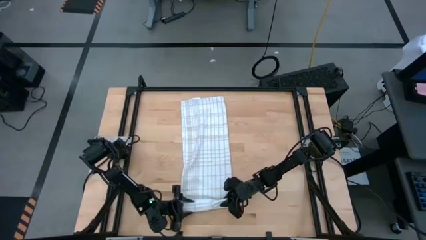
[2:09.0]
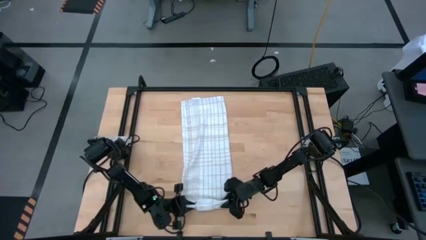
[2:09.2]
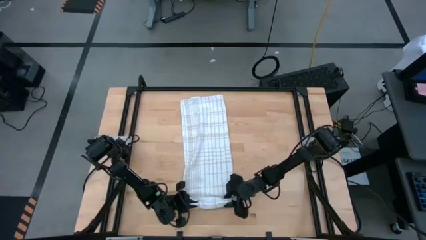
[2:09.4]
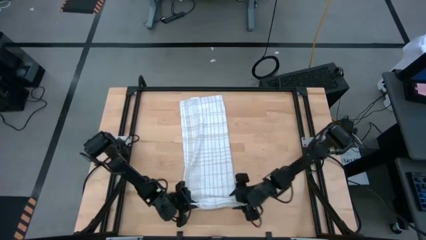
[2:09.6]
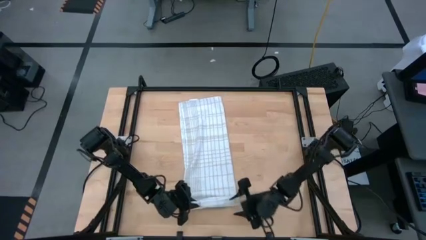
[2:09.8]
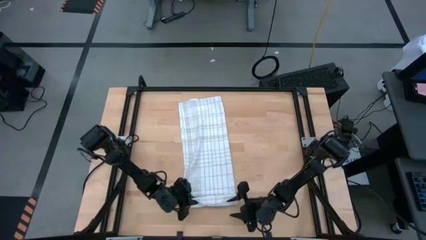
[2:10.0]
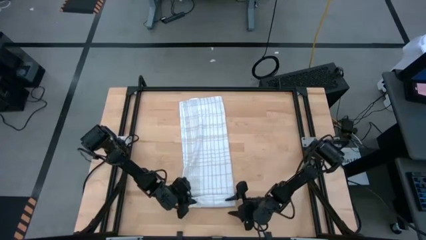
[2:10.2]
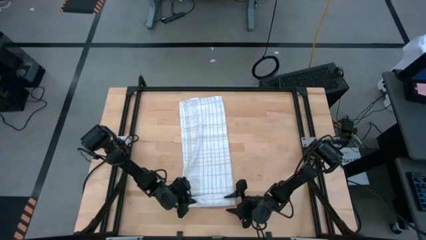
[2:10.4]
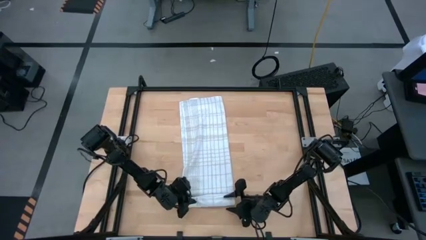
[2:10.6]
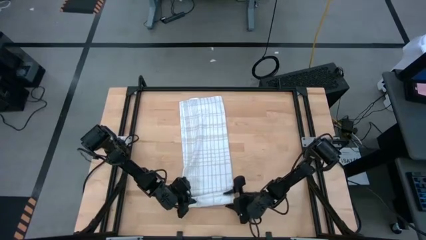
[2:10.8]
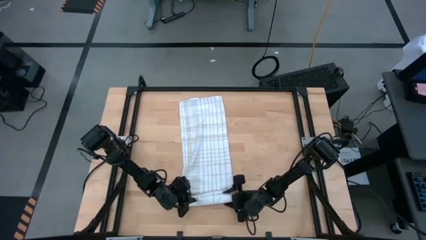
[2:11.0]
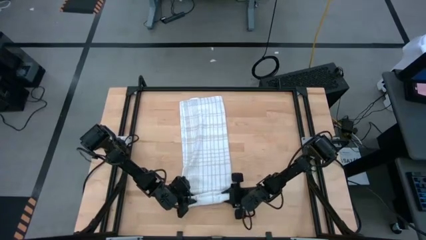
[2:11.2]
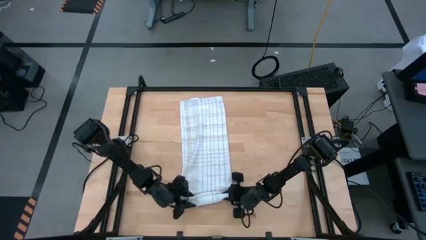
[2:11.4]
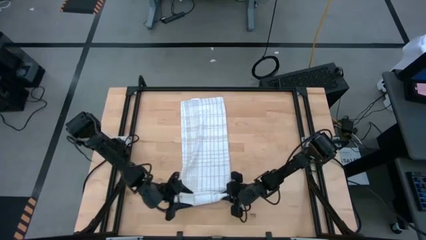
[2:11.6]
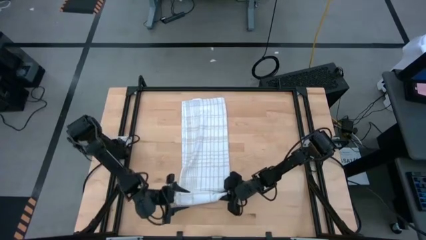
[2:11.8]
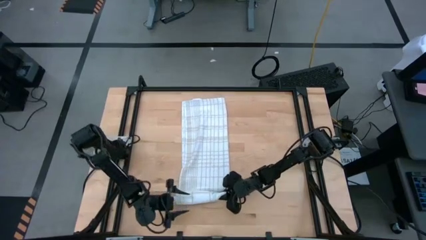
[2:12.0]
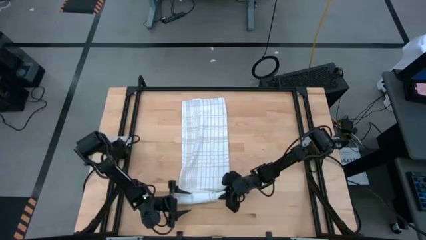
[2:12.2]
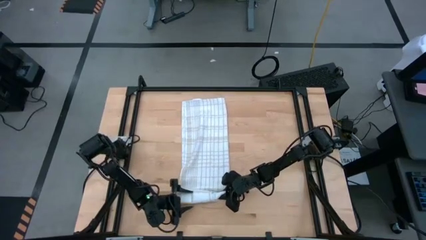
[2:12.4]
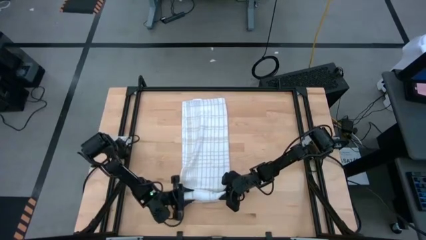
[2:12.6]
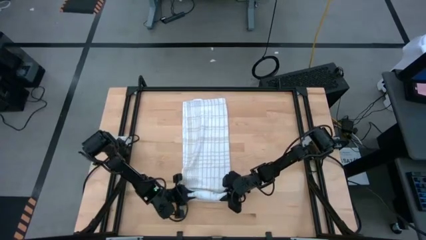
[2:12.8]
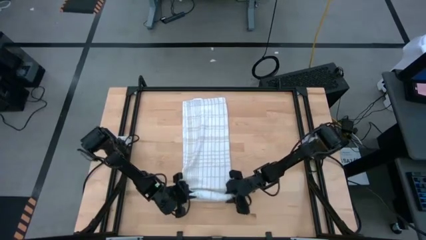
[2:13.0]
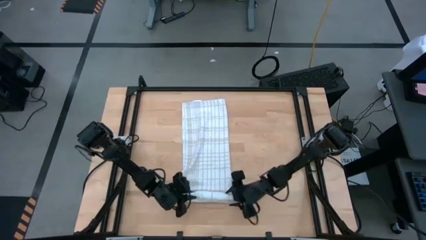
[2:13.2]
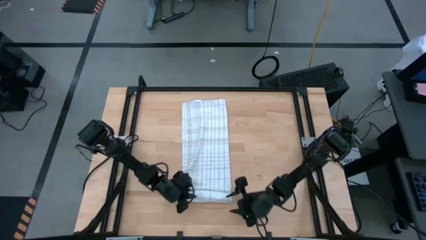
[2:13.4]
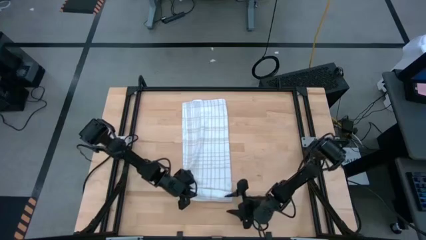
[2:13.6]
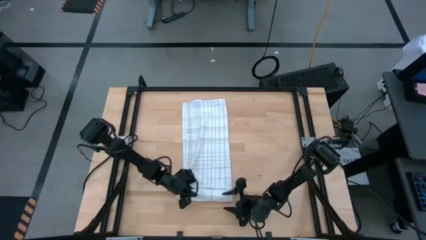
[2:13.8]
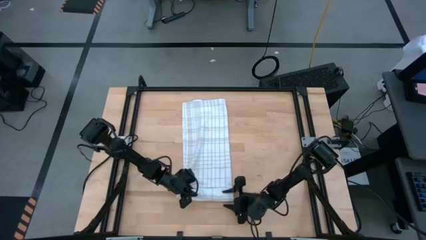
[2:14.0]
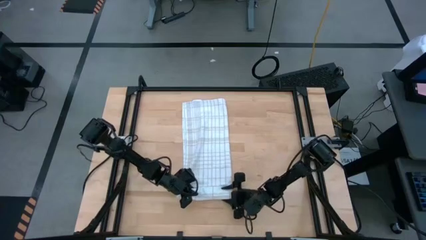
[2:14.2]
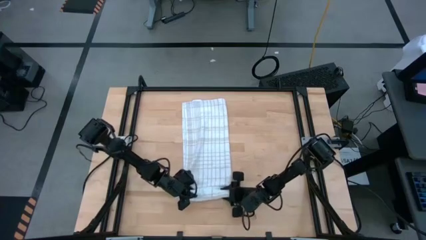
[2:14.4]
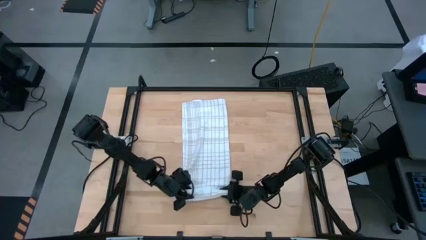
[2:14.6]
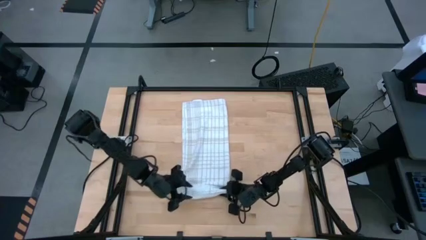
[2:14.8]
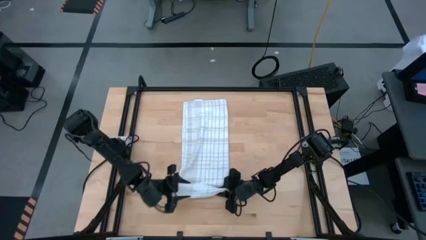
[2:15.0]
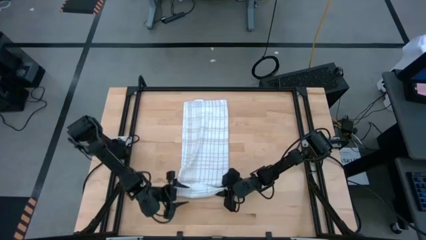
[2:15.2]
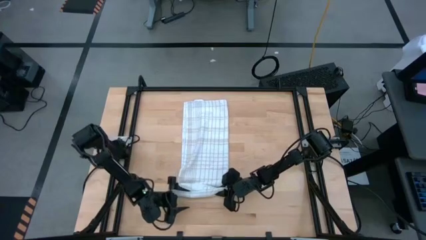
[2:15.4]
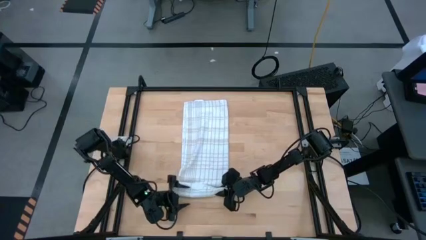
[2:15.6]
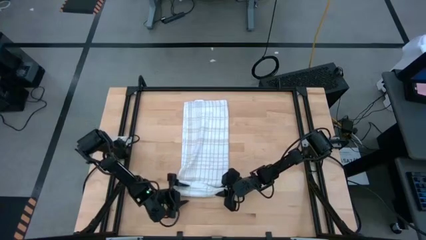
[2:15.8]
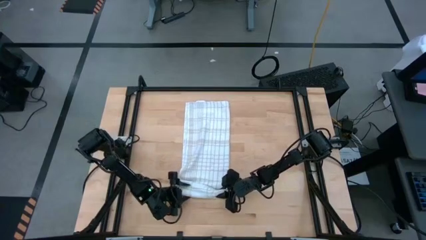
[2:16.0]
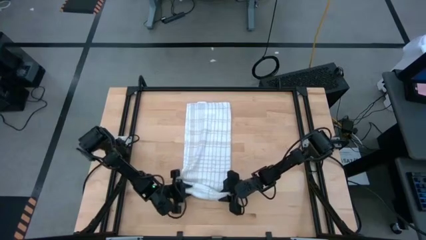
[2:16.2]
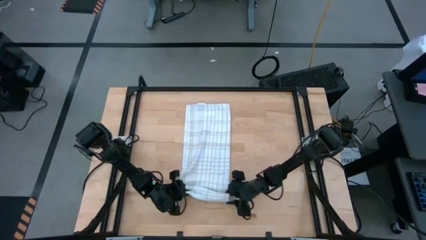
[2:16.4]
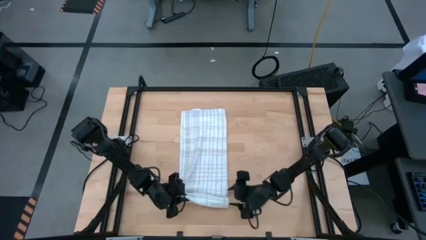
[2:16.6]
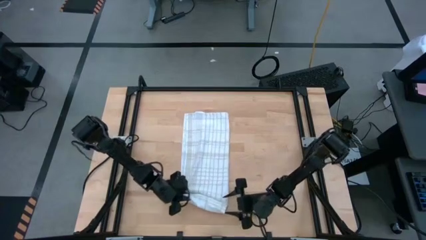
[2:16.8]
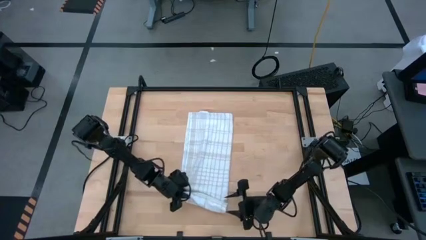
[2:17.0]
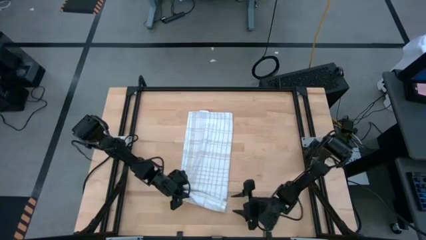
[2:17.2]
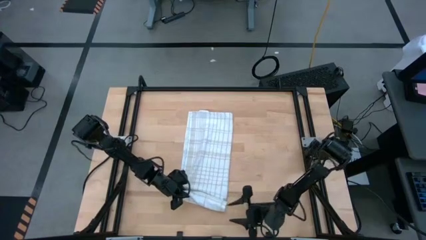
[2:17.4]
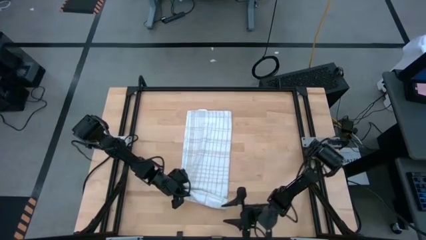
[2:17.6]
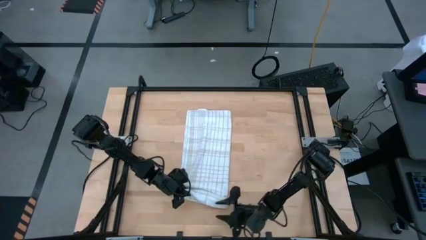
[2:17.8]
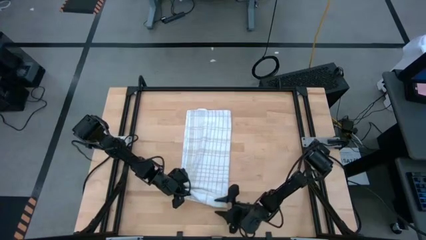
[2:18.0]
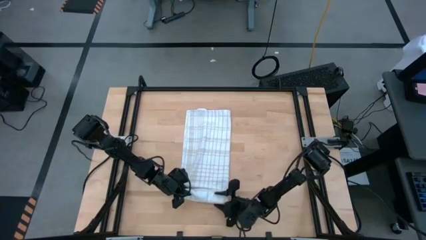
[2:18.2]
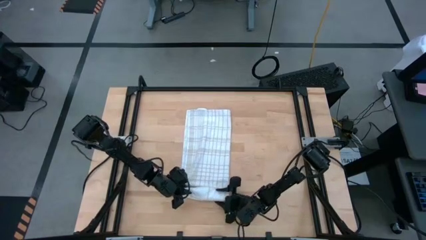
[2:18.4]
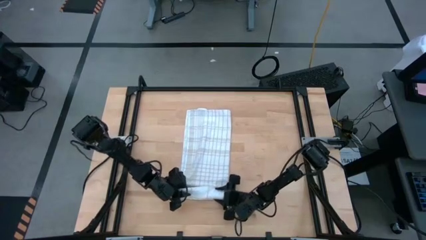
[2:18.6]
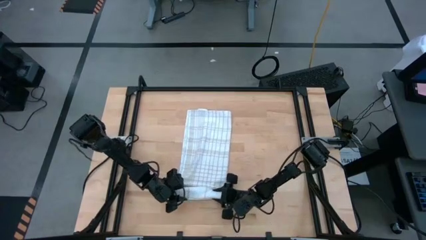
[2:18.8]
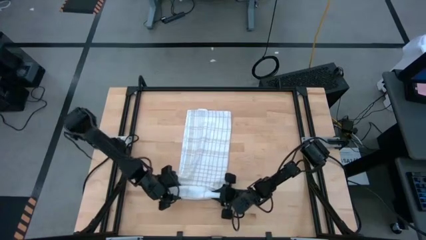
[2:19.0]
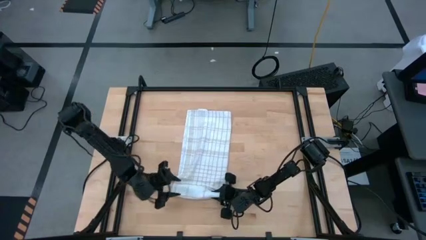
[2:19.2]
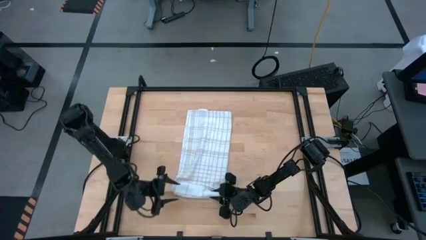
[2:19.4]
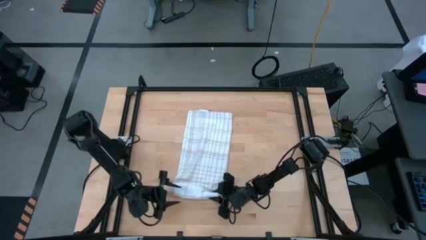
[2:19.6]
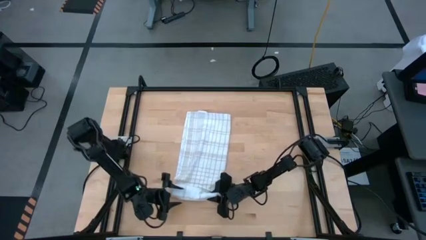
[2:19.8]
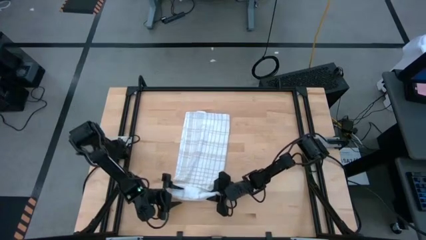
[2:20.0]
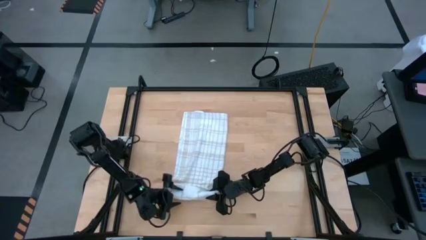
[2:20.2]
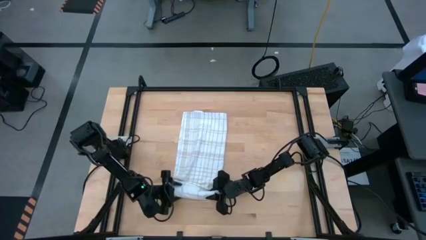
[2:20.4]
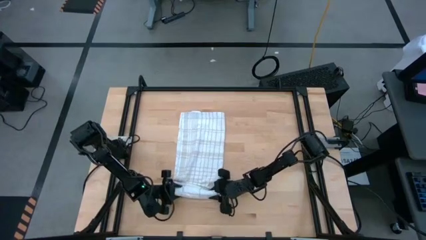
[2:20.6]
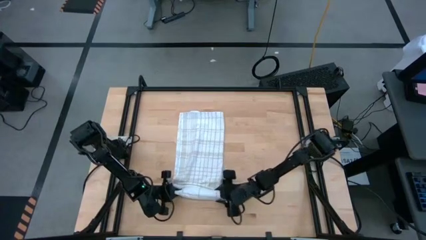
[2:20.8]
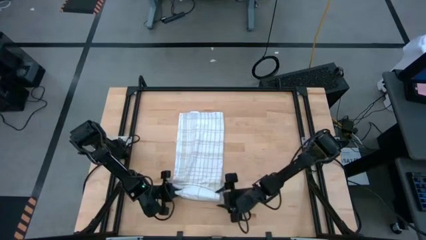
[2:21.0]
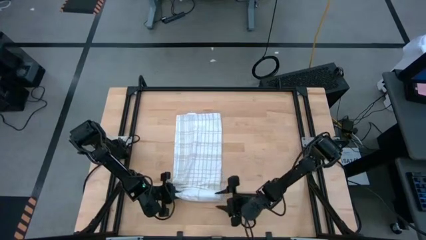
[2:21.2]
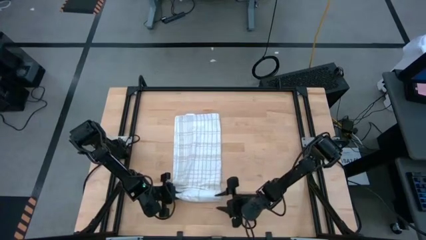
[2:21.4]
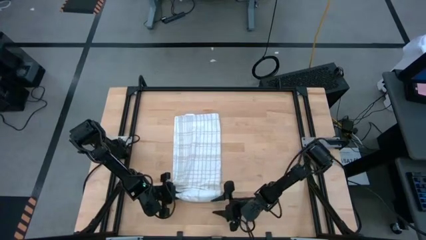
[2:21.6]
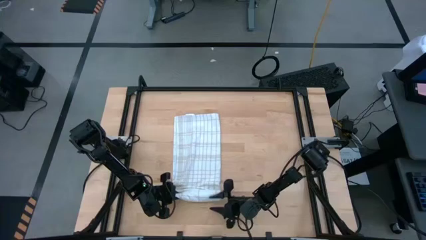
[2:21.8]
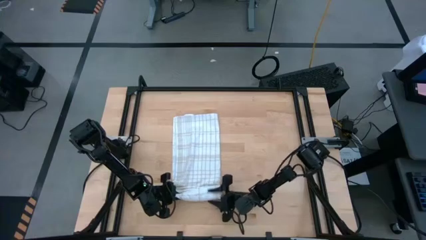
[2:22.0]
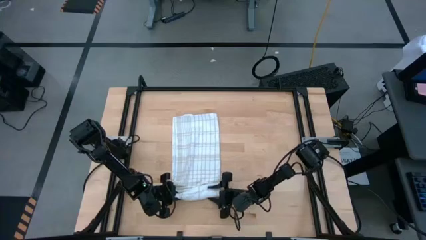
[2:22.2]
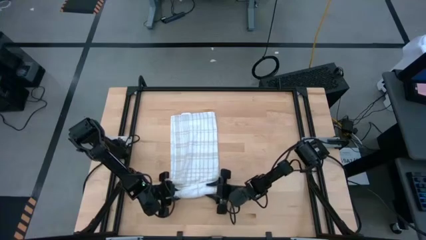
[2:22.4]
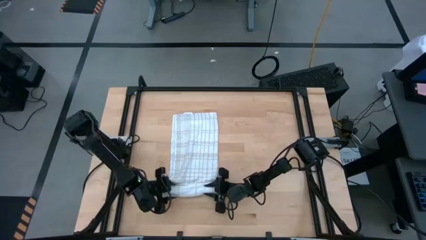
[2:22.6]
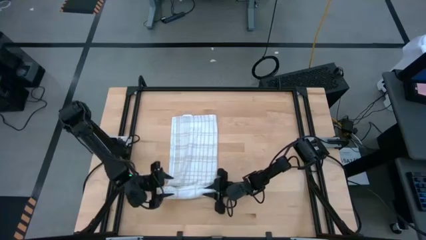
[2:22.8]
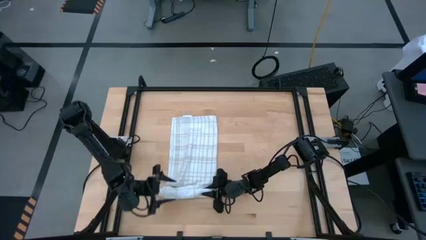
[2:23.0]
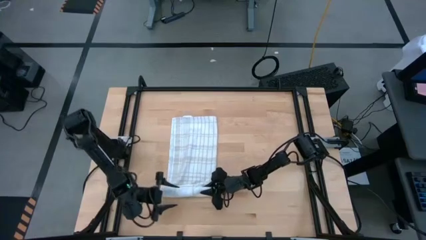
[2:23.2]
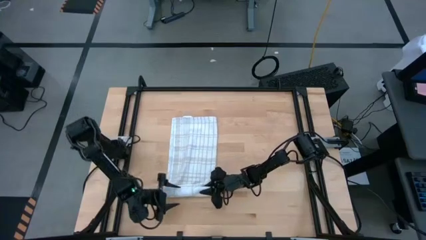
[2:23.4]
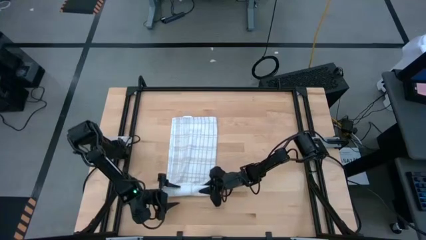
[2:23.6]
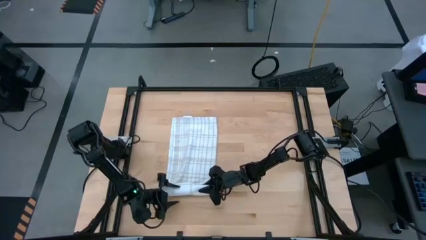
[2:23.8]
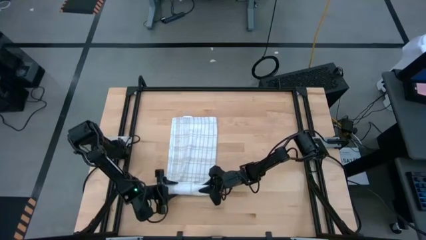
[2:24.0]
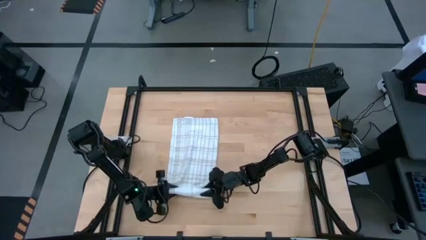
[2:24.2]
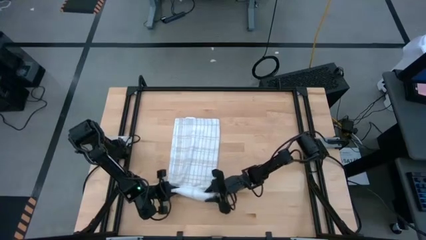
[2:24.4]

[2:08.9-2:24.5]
Task: Roll towel
Roll the white towel

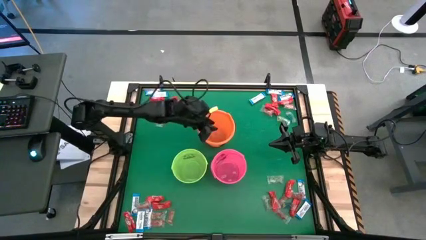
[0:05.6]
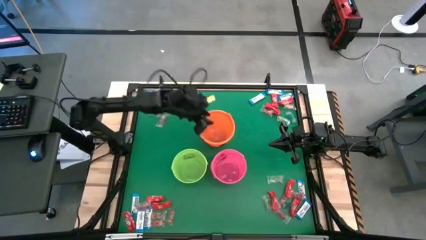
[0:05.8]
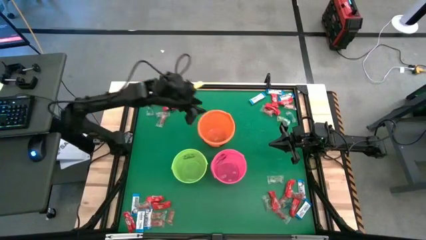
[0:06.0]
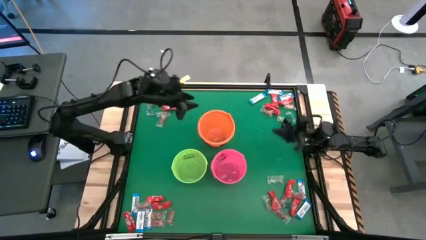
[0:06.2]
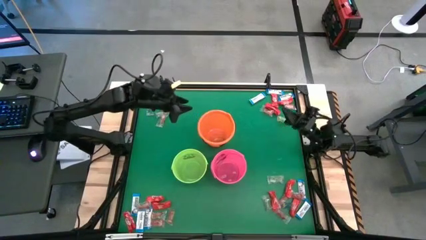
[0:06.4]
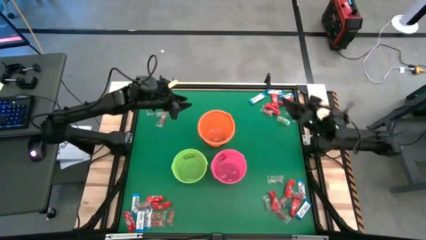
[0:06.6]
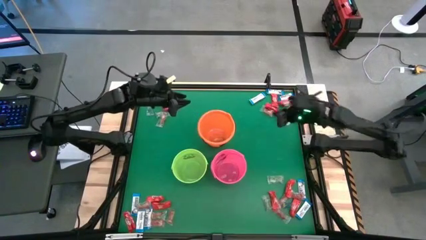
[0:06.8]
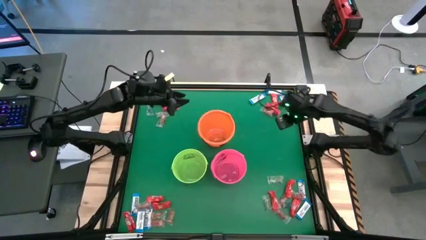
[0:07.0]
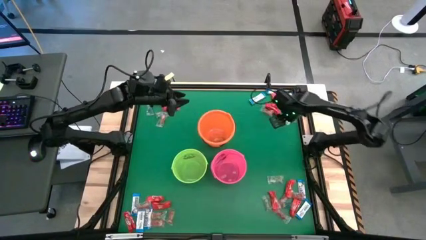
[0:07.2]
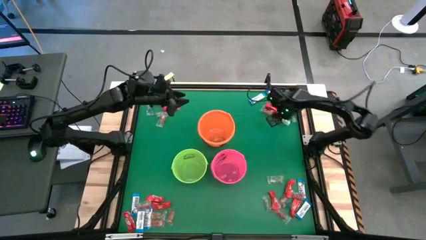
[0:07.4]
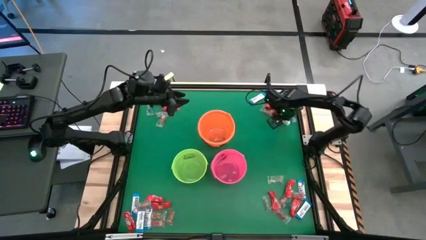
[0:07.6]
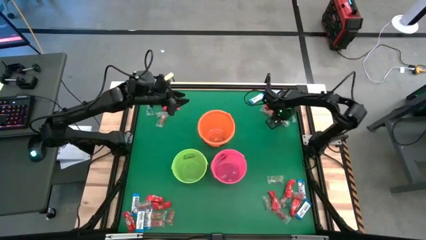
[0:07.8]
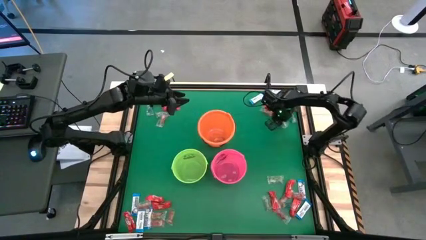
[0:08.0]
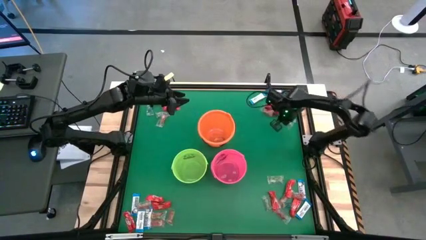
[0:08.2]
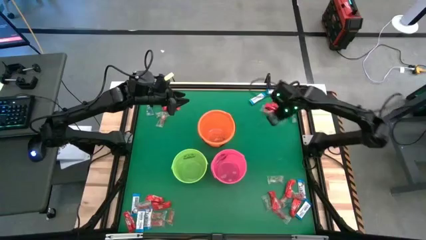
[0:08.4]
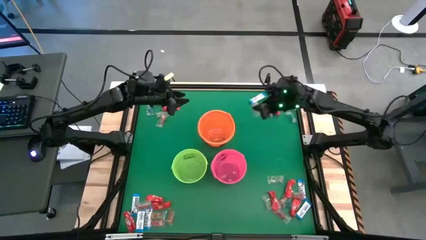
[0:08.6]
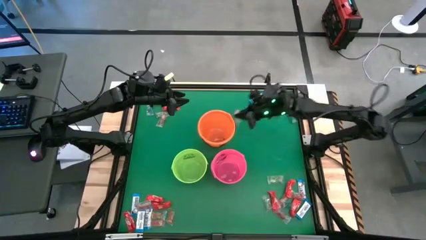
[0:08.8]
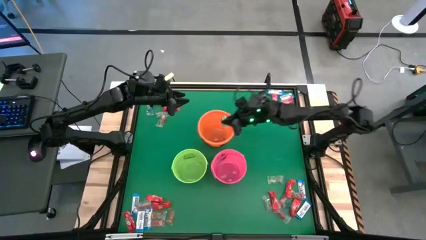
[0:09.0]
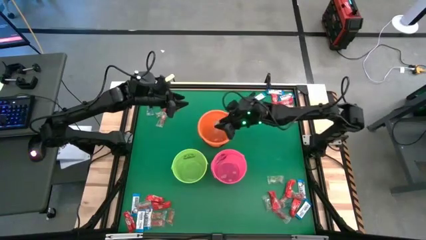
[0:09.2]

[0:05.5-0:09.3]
Task: Sort candy by brand, put in halloween buckets
Put the green gummy into the orange bucket
